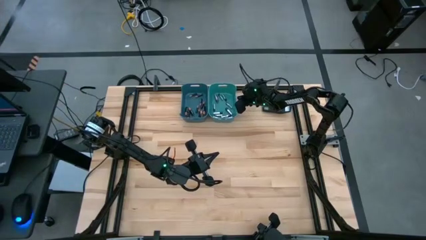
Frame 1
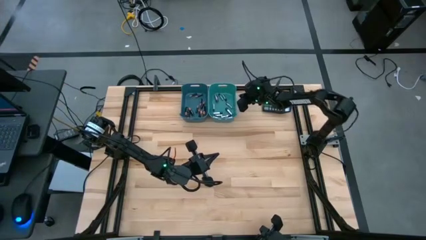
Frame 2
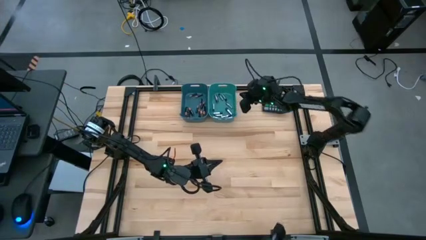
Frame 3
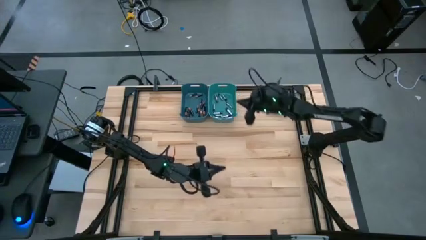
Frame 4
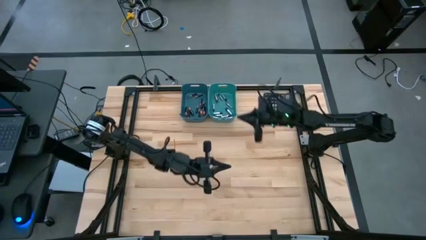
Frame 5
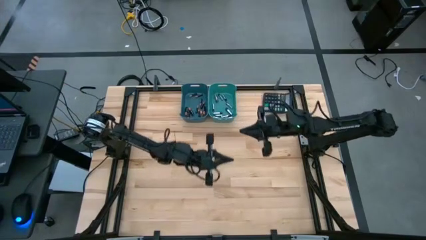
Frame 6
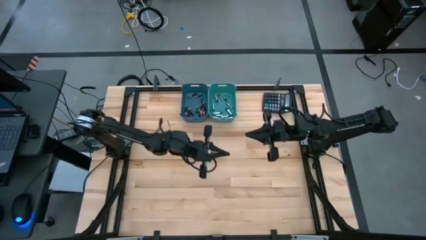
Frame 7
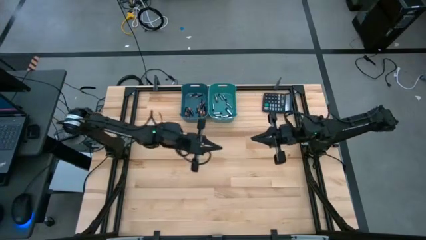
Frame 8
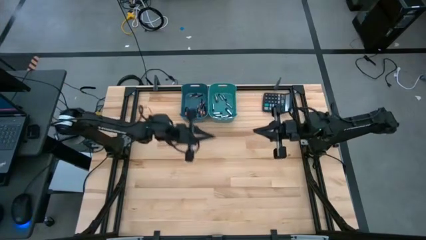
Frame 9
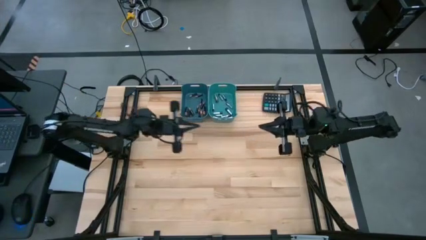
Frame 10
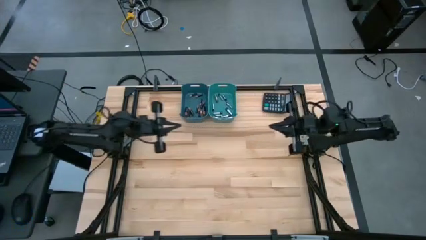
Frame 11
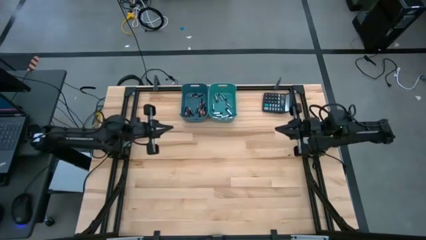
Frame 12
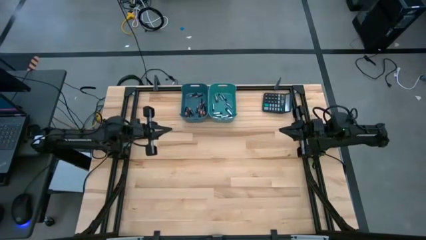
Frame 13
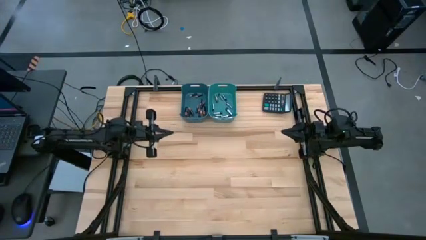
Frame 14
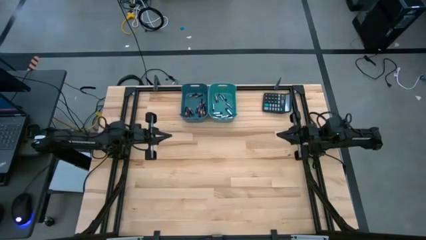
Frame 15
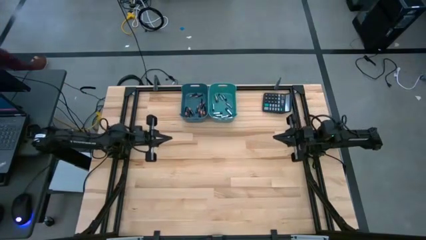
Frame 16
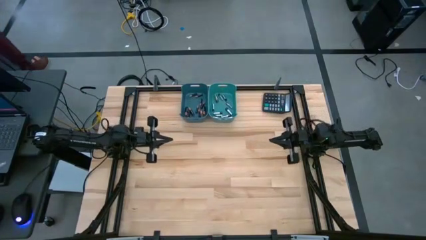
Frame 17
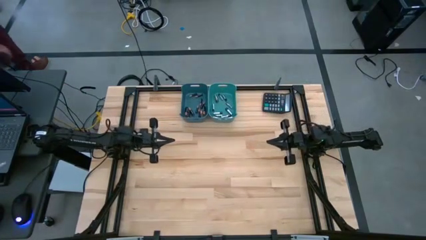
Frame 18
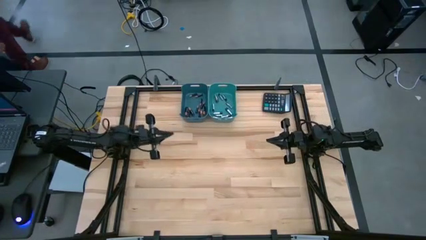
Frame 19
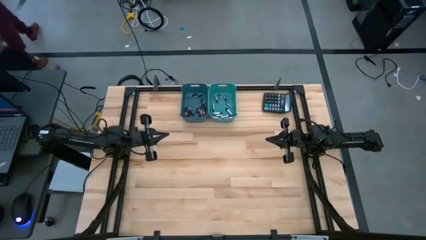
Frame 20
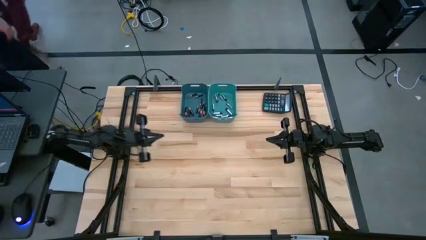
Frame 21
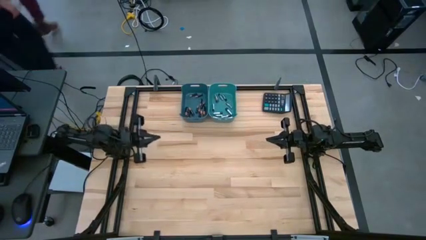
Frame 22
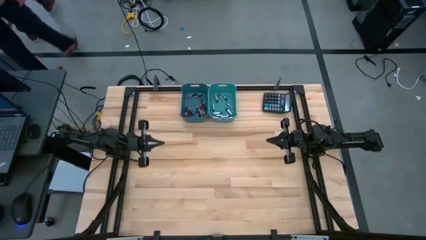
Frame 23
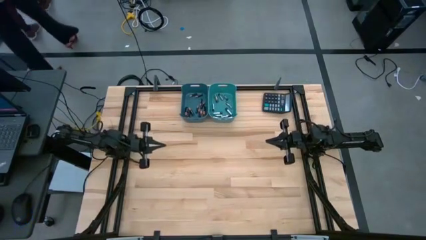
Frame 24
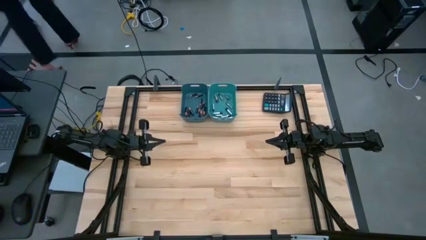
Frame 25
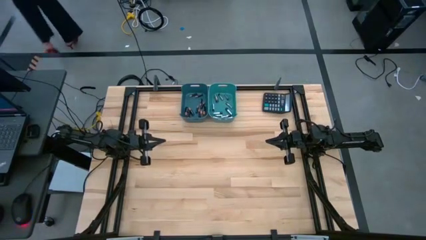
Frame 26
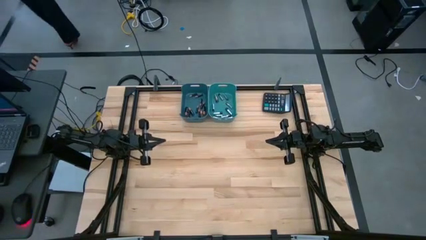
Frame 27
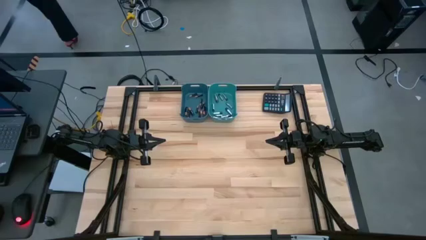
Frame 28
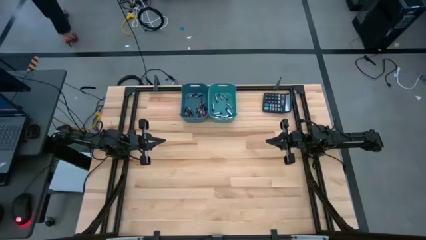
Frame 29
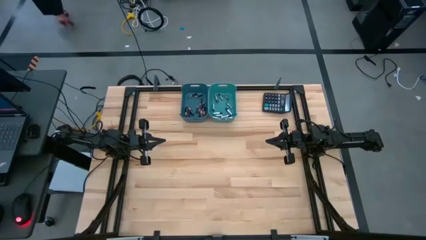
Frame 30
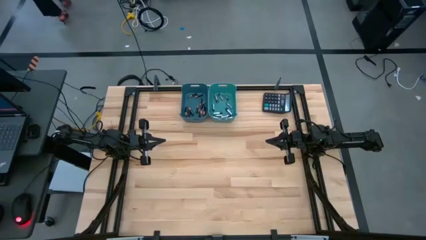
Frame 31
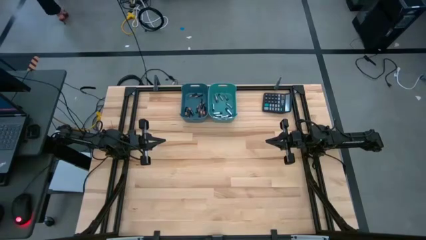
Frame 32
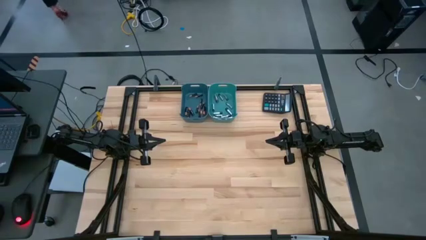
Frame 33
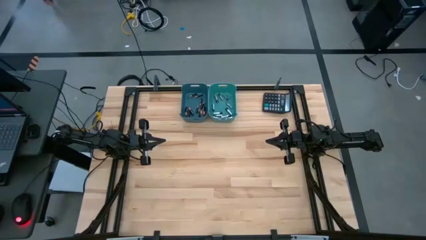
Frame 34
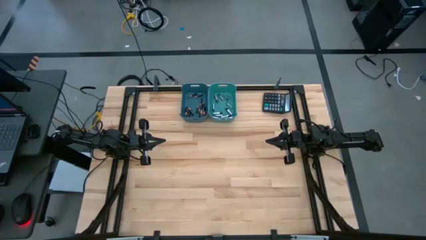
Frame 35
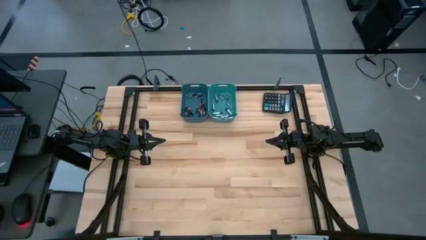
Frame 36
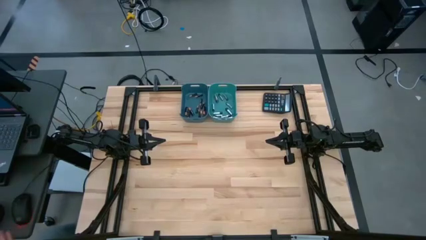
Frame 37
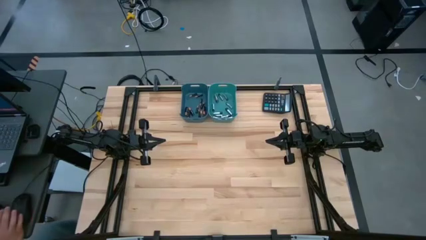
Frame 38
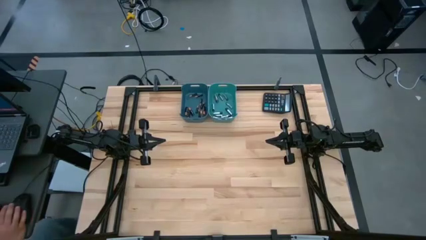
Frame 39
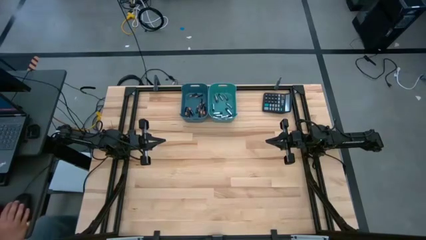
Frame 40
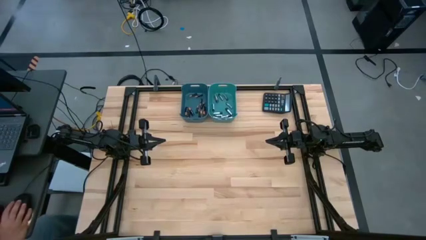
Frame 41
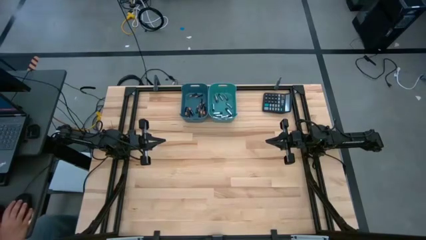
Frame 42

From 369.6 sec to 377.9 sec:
Task: Sort batteries
Return to Home Position

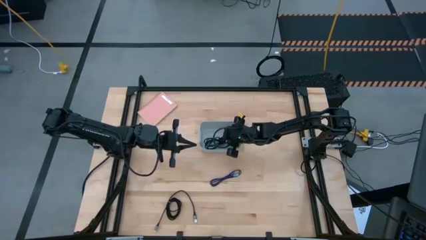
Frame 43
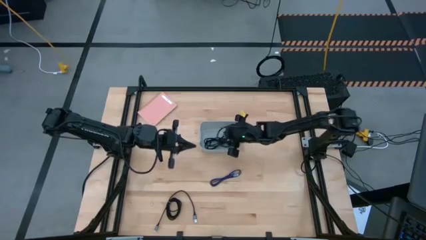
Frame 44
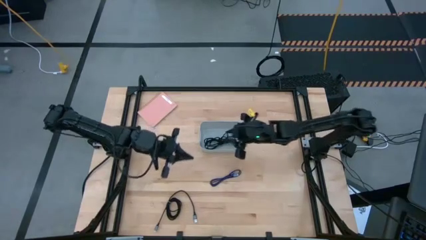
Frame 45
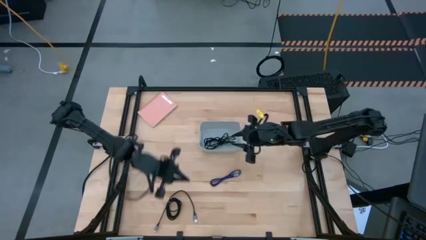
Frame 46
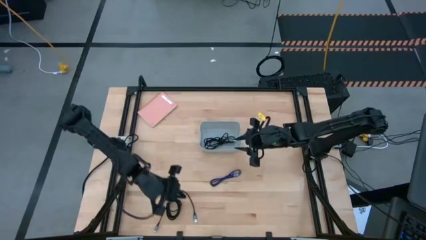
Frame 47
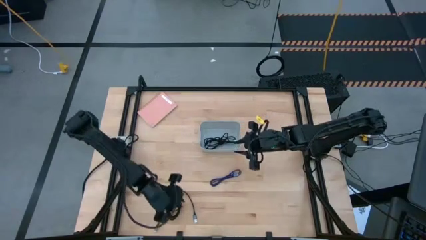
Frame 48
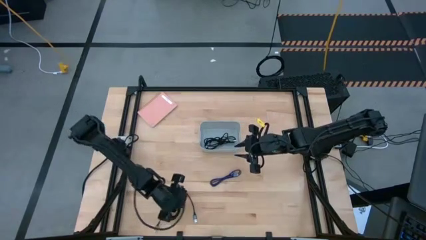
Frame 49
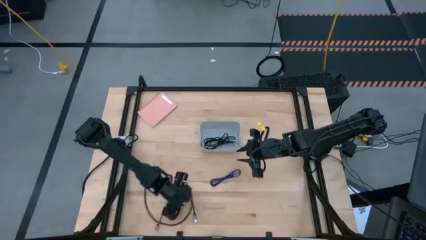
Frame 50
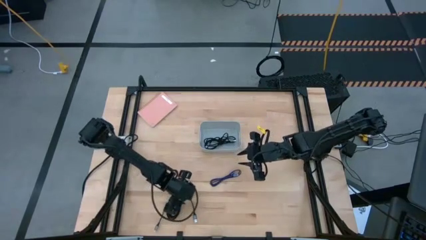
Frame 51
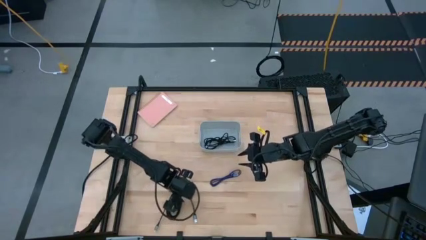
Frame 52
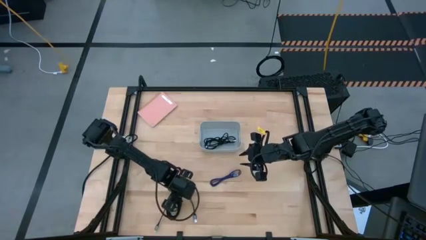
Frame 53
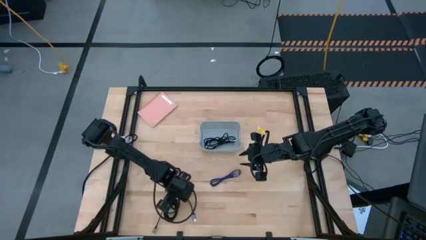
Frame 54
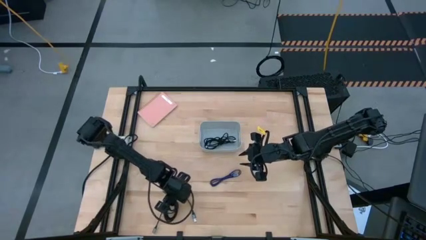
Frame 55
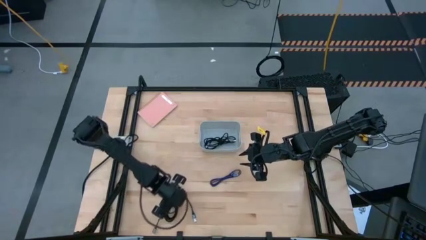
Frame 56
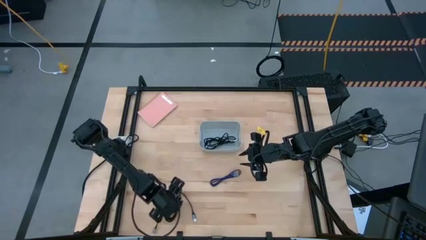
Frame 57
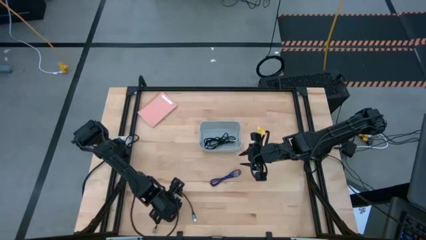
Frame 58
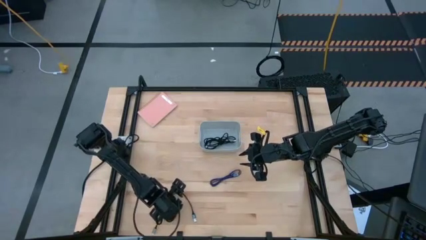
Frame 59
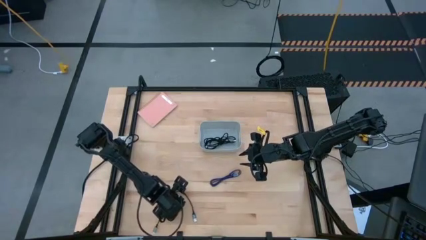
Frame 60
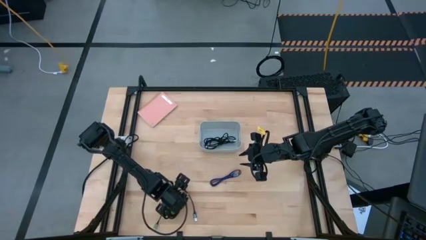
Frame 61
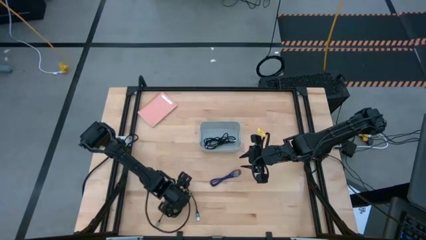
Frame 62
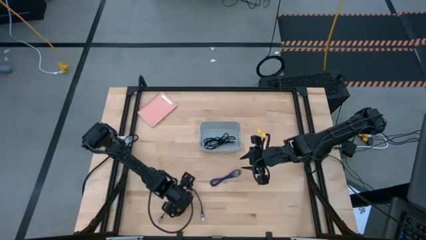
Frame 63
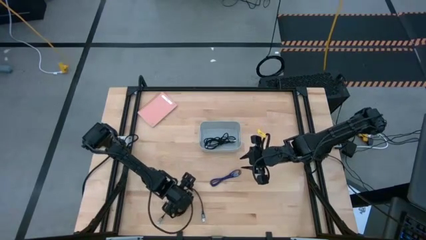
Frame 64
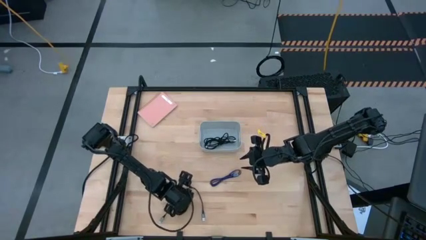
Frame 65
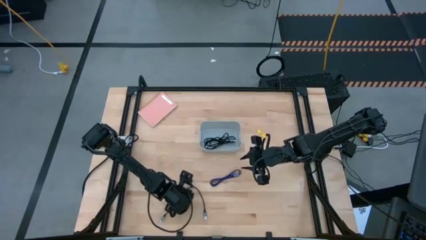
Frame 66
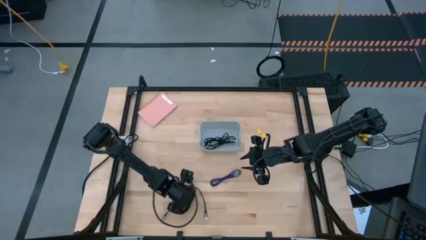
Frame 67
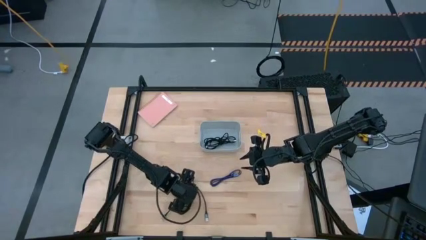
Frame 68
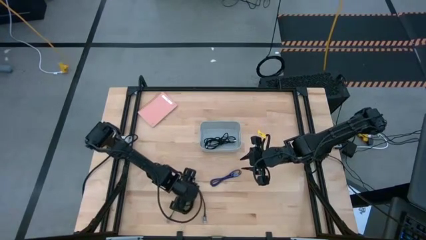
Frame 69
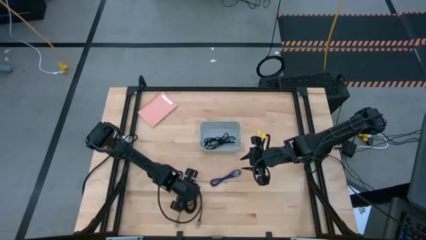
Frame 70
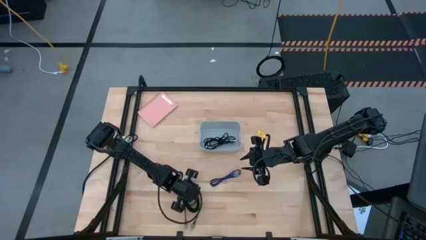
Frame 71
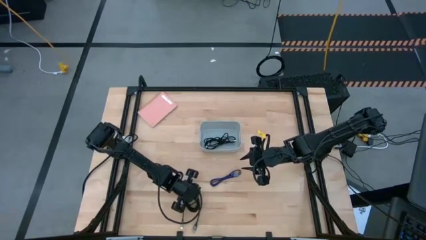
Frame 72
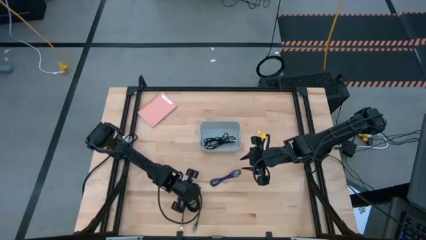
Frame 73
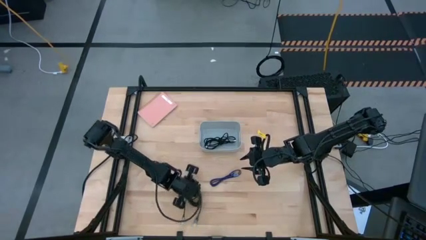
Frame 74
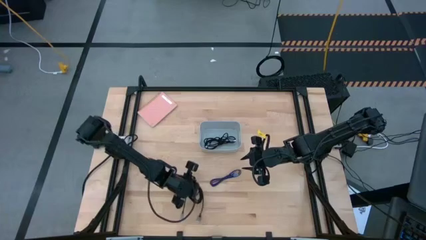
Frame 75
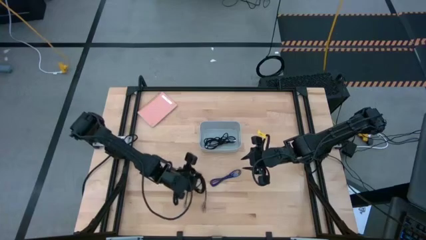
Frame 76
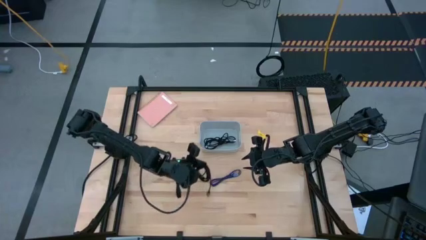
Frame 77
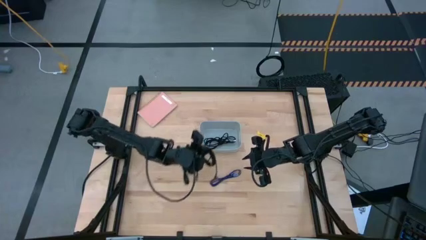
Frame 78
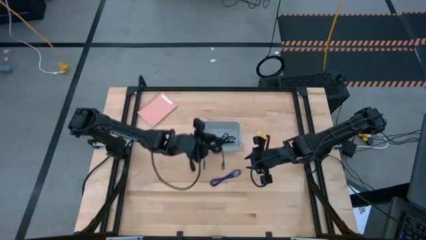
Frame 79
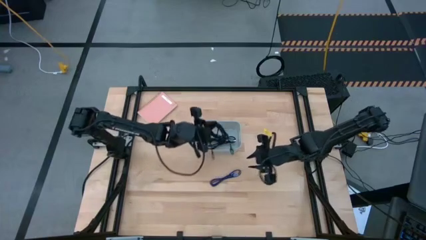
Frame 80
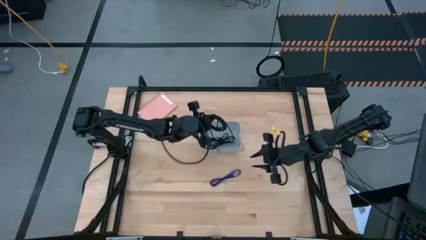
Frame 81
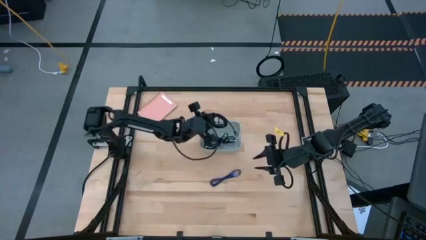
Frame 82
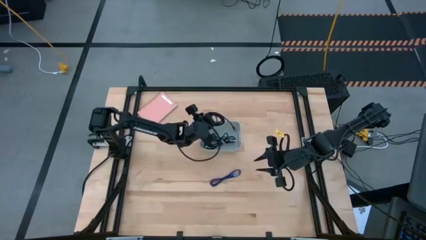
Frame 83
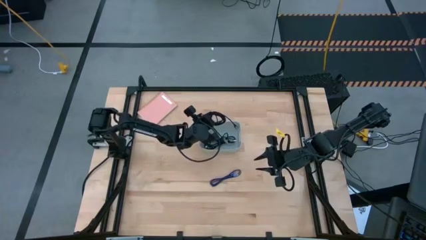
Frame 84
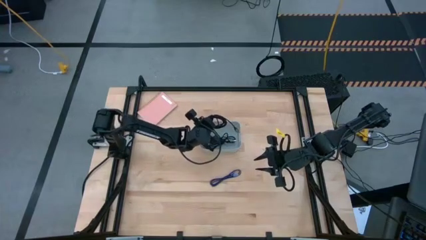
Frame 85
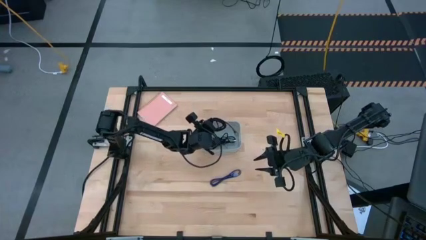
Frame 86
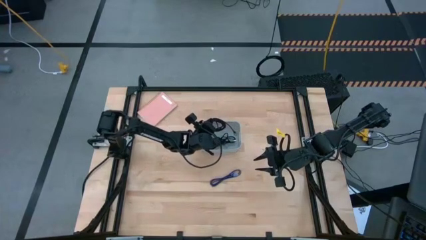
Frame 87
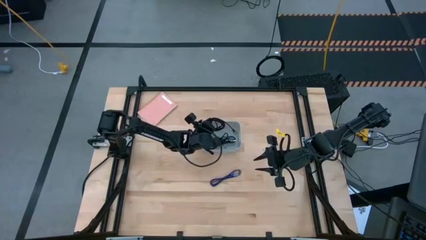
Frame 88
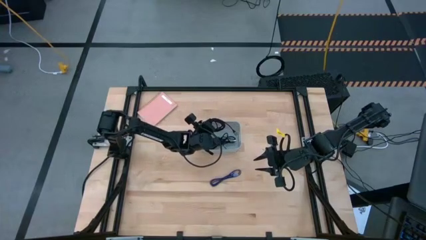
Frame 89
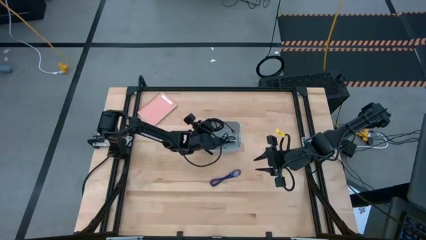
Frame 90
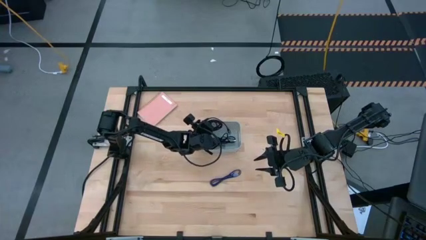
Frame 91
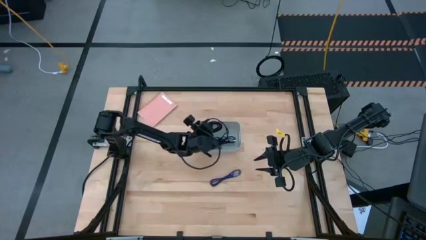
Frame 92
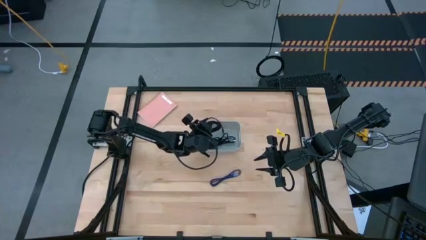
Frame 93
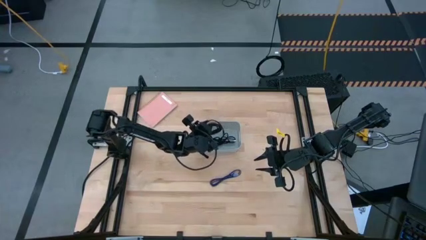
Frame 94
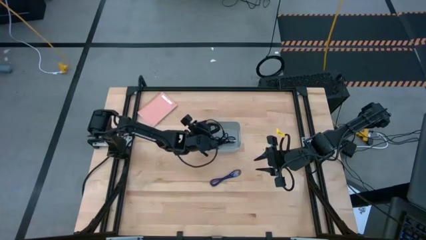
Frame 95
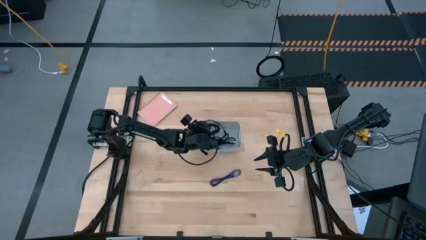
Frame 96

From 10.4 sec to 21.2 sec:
Task: Pick and place USB-C Cables
Put the black charger cable into the gray bin
